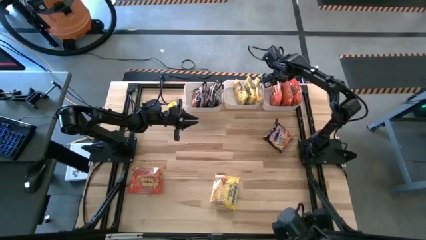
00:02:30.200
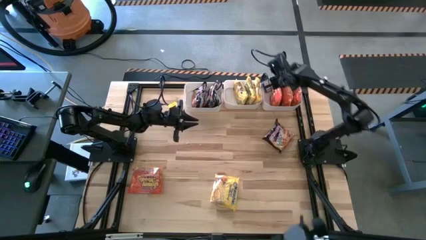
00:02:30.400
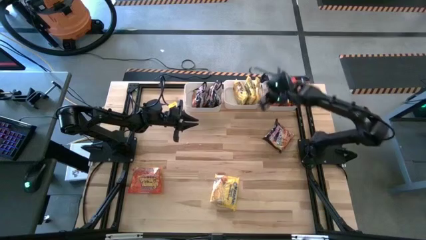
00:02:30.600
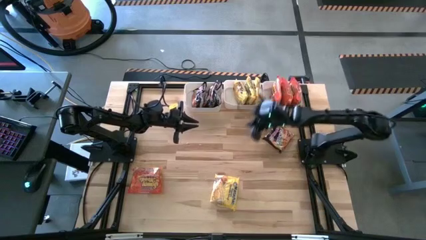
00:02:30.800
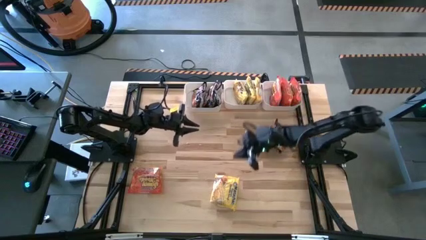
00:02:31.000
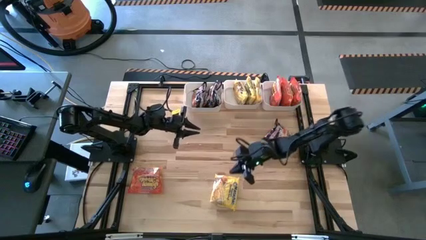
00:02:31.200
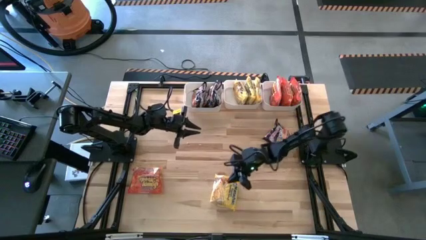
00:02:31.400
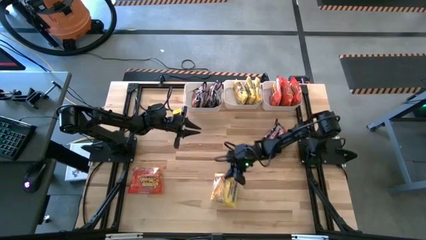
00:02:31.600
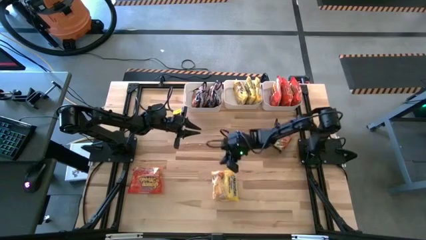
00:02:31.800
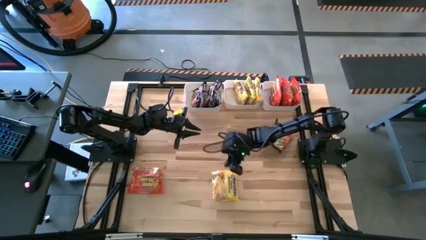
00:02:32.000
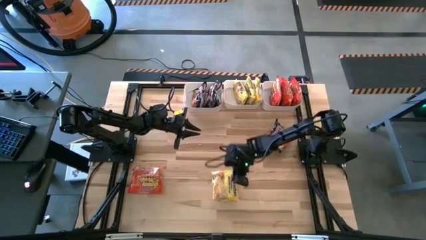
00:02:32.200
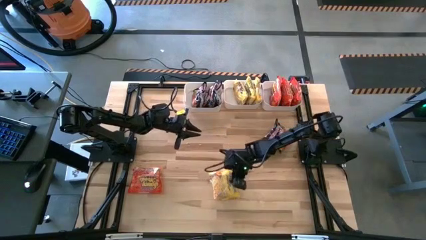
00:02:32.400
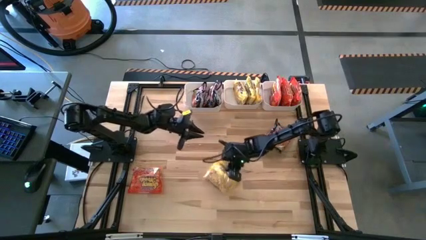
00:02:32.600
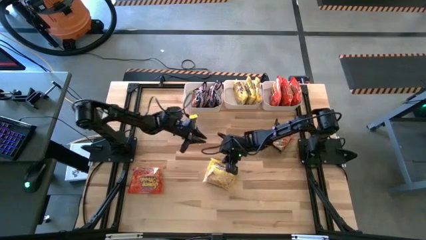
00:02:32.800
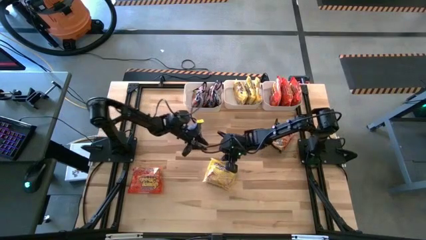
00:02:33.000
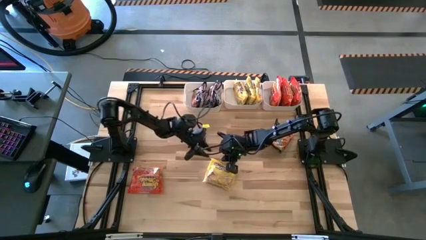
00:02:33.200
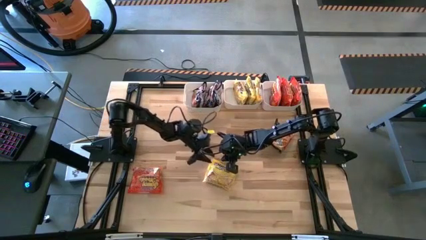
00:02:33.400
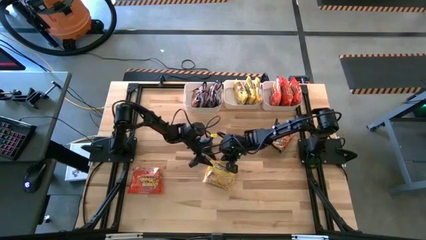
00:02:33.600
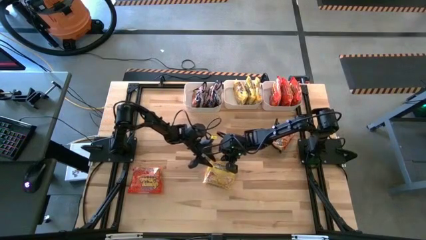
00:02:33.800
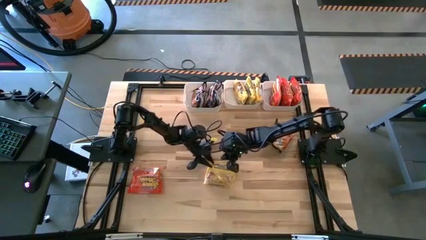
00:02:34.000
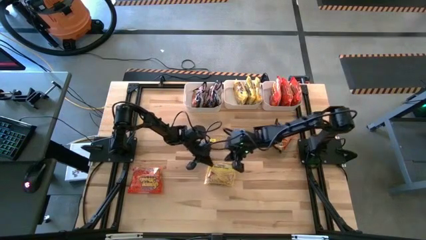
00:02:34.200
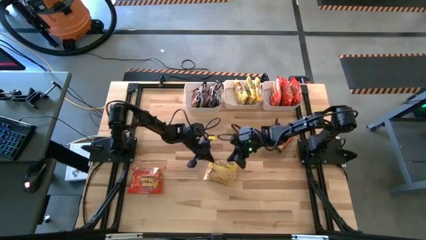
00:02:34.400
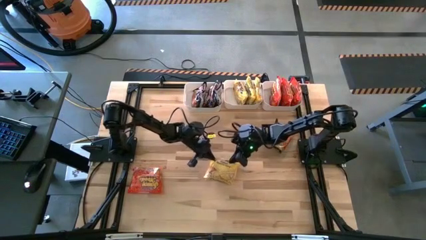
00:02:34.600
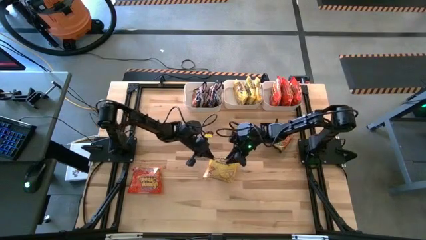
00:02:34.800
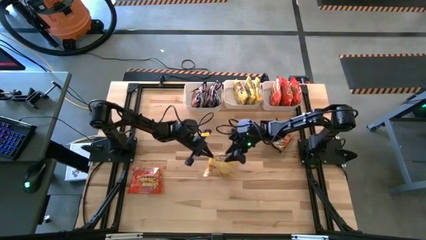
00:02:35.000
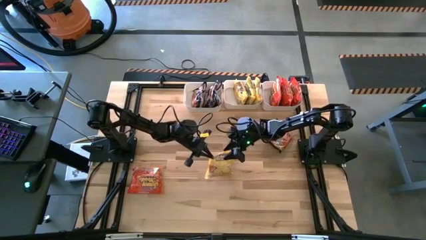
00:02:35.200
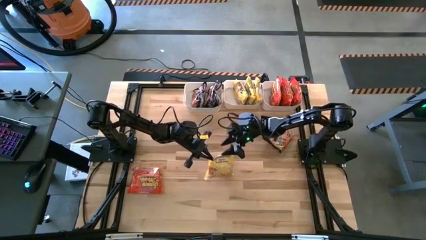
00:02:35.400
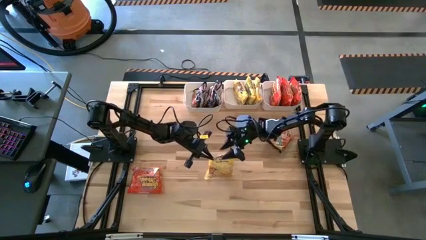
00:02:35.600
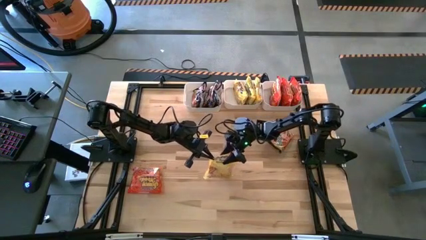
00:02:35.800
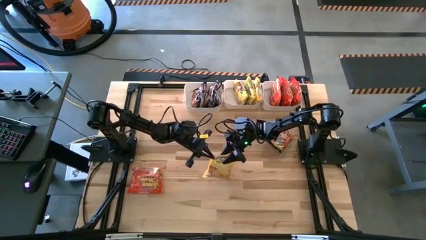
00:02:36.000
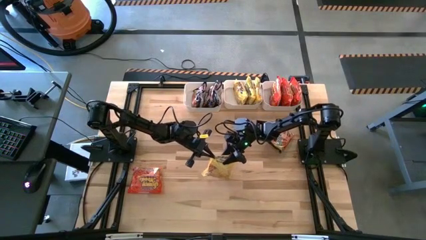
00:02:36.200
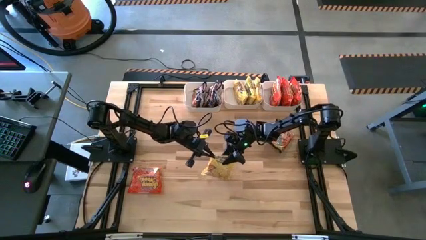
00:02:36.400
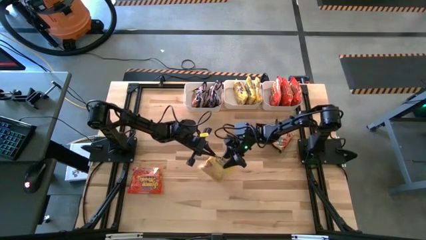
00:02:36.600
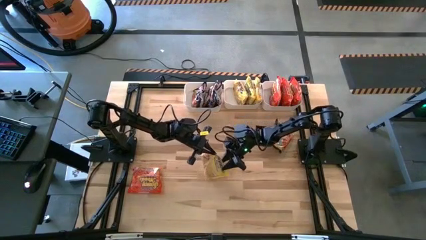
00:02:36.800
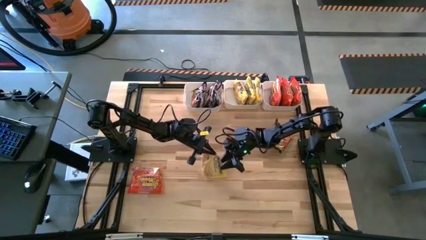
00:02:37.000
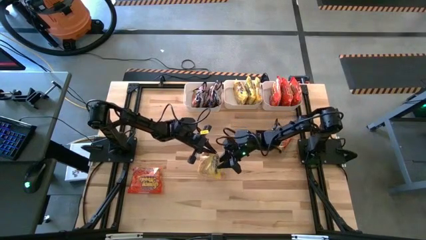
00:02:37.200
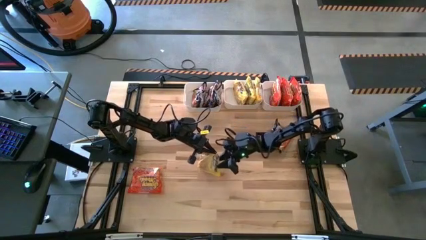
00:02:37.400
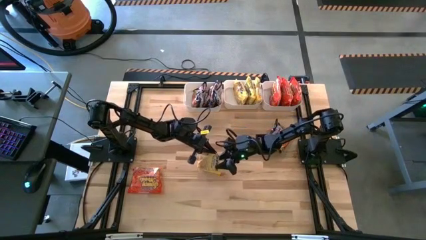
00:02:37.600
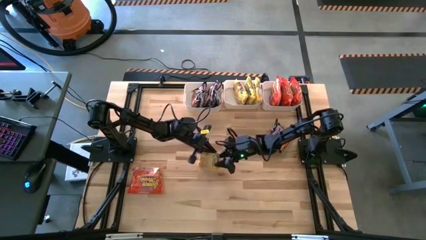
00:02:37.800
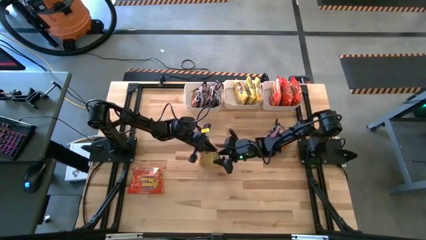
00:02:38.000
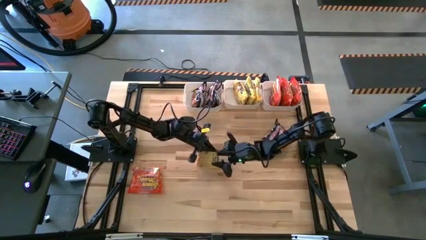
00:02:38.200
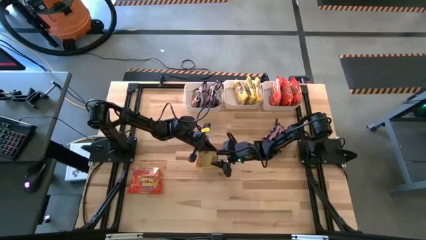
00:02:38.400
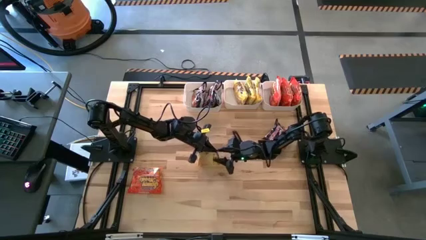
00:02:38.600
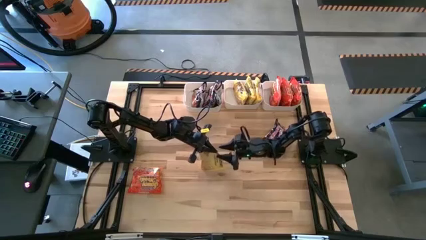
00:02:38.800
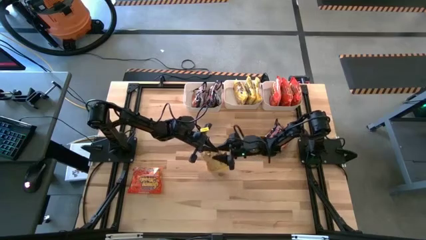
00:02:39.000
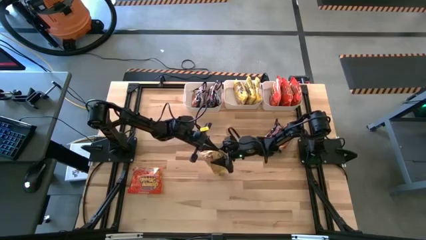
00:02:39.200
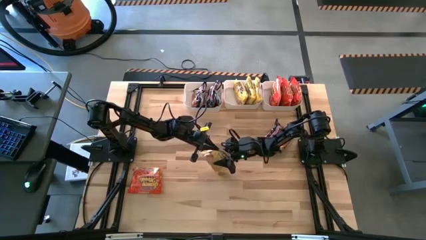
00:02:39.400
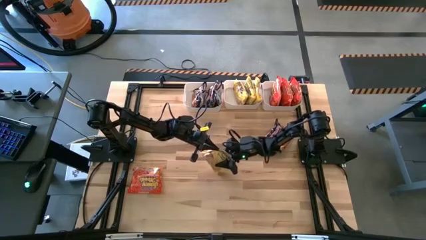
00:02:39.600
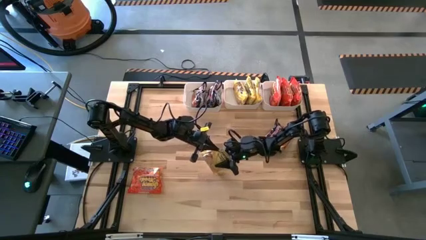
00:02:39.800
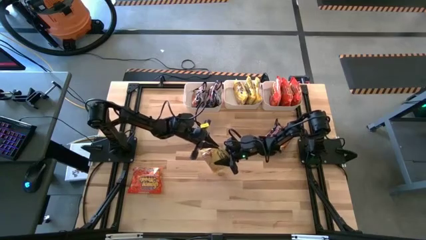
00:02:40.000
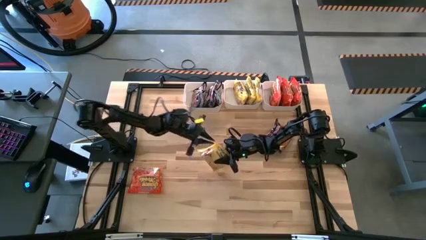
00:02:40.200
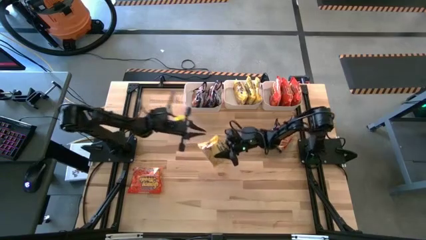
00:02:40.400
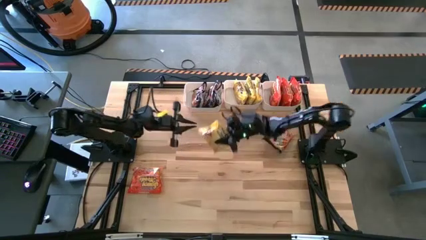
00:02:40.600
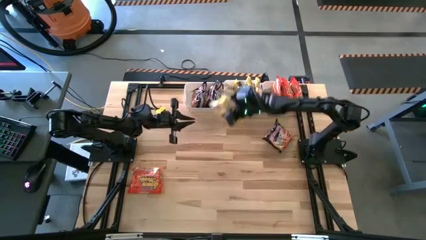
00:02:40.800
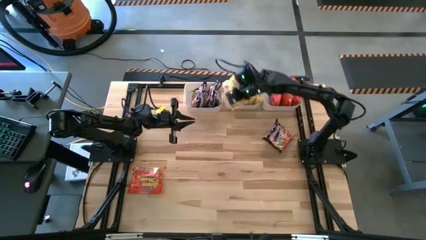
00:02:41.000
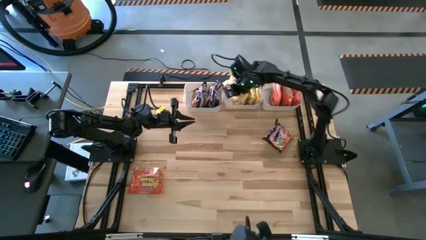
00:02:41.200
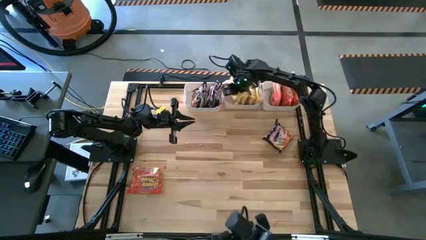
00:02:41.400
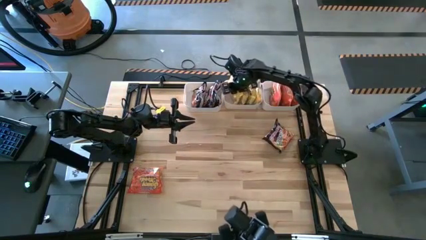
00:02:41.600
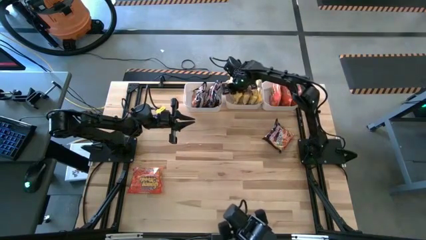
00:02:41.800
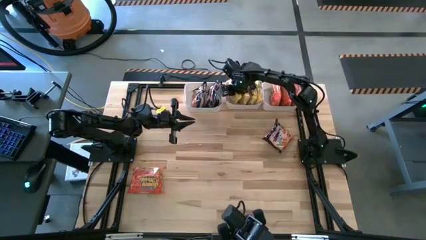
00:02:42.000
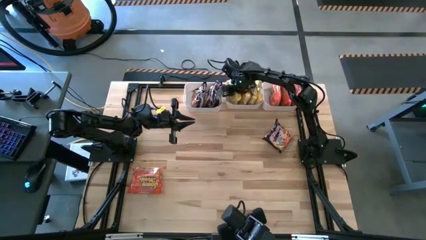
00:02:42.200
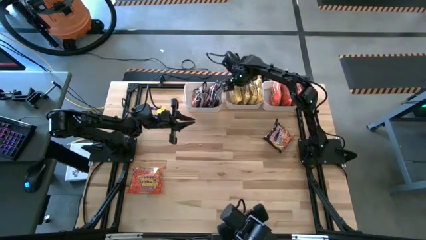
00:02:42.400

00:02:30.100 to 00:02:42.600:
Task: Sort Maruchan noodles
Put the yellow noodle into the center white bin

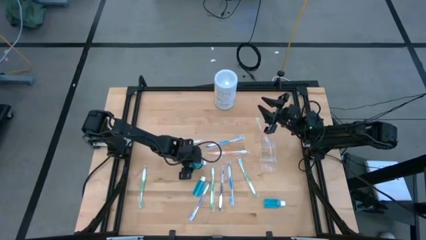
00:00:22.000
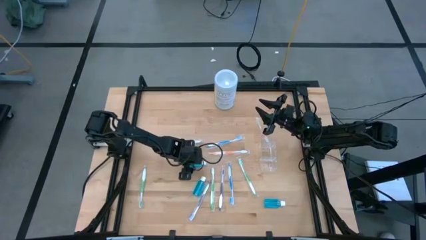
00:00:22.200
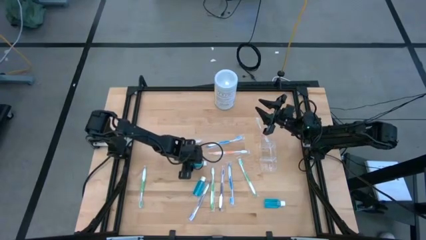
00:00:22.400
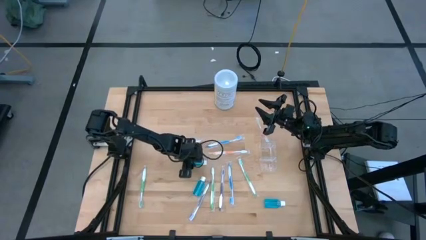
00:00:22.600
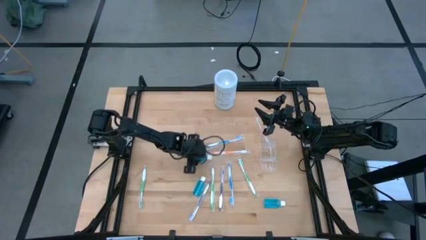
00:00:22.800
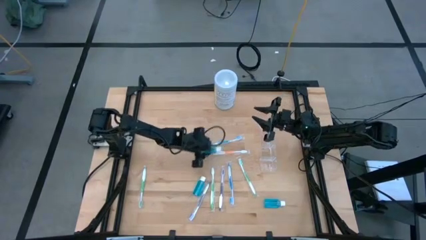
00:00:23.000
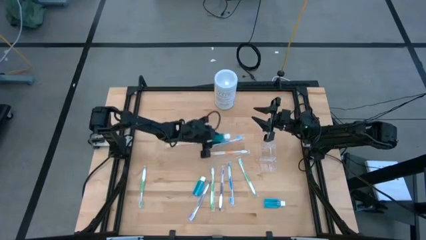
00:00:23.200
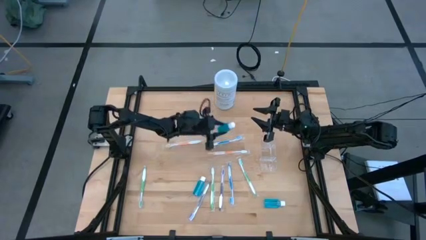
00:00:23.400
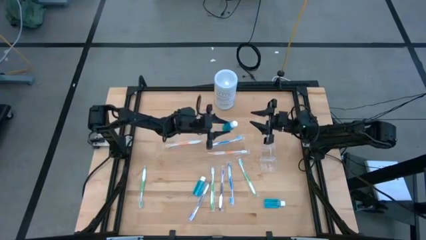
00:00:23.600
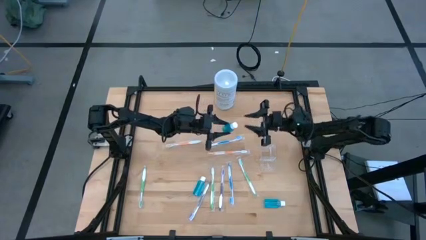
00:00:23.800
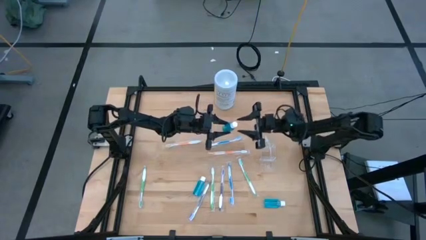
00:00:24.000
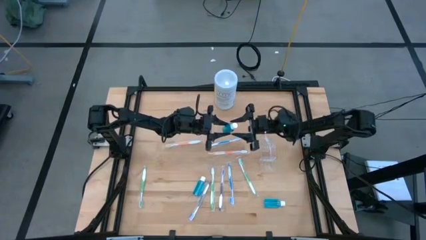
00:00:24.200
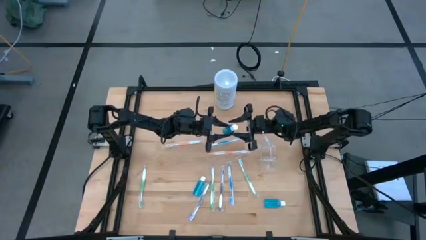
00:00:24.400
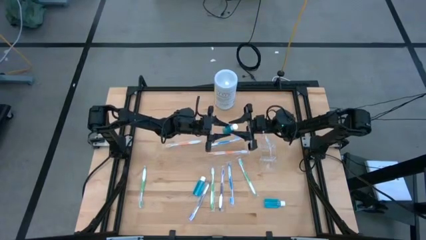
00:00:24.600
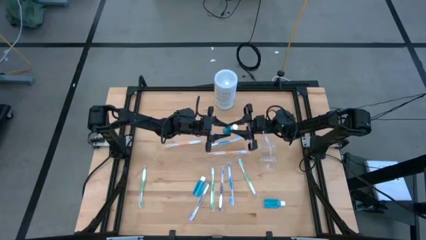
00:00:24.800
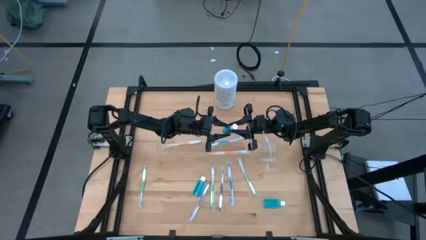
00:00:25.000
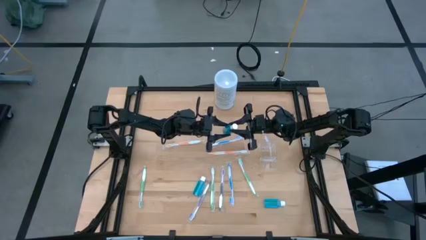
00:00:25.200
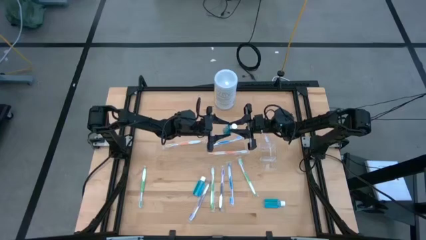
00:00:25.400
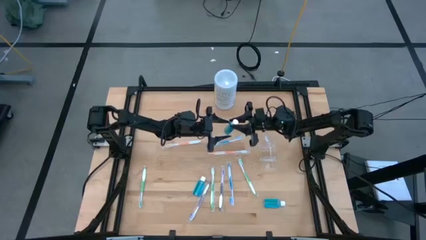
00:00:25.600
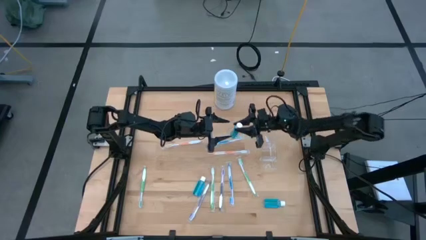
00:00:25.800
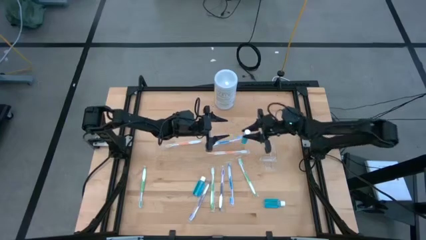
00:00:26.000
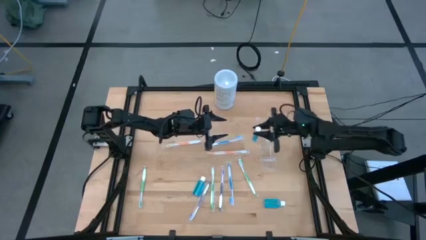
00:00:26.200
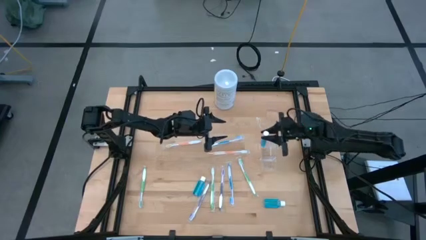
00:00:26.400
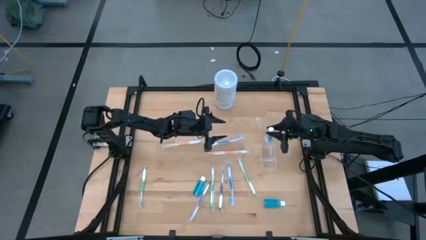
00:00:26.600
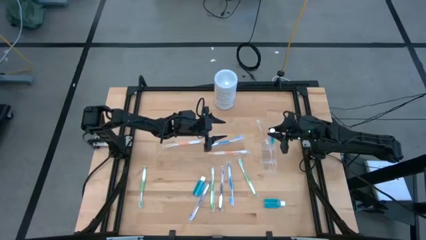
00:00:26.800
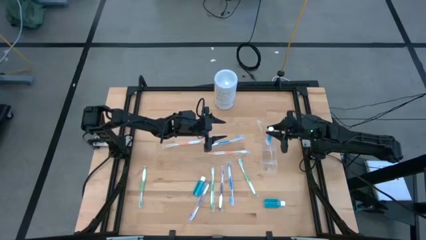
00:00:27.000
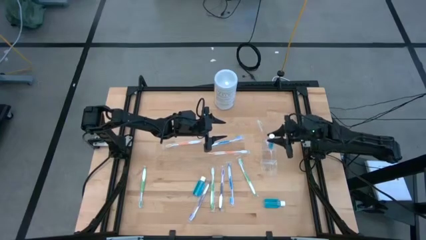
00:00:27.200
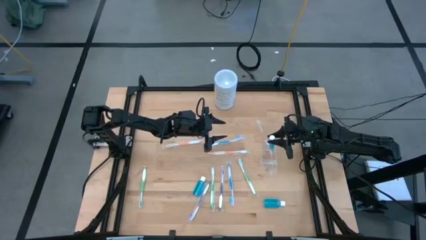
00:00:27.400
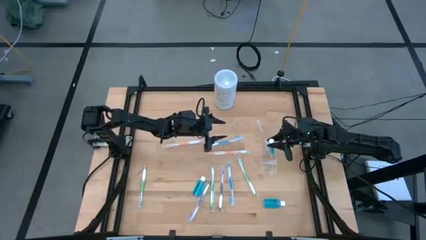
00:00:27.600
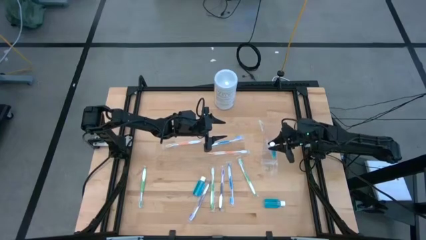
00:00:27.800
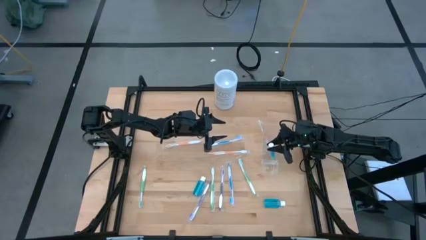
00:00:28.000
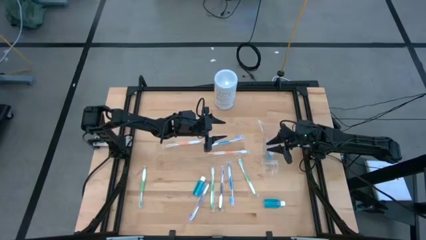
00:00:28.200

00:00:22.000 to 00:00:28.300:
Task: Pick & Place toothbrushing station
Put the left mouthwash into the transparent organizer
